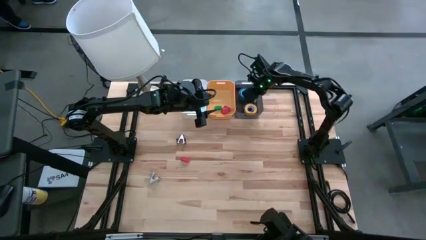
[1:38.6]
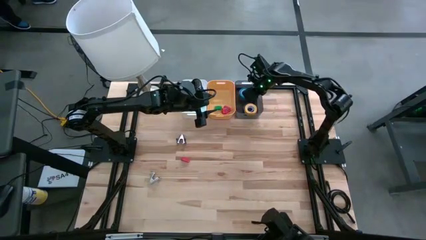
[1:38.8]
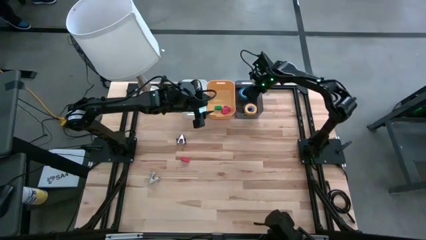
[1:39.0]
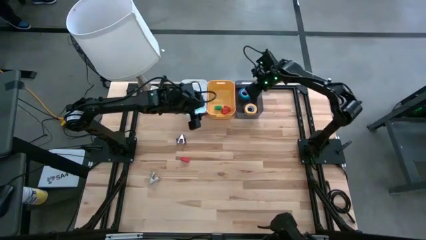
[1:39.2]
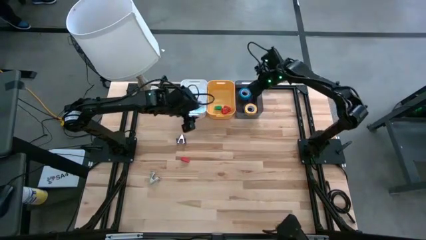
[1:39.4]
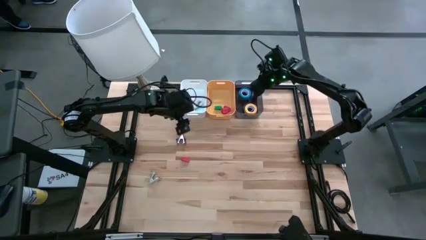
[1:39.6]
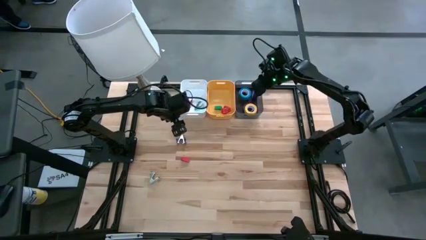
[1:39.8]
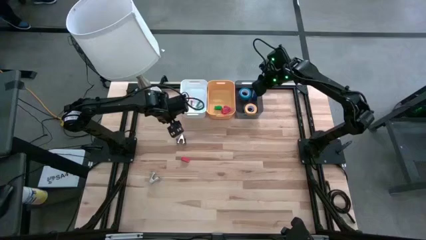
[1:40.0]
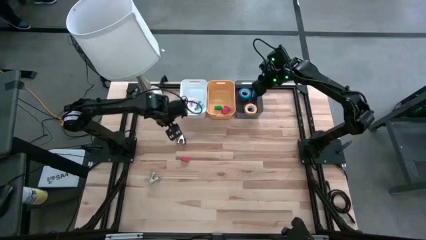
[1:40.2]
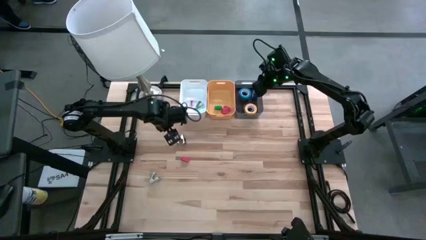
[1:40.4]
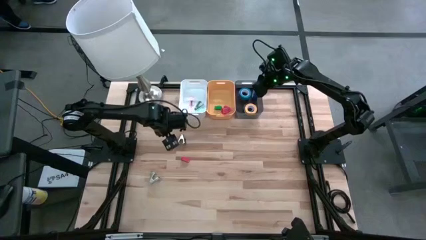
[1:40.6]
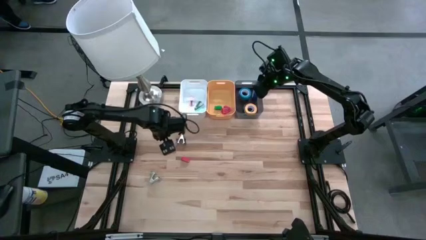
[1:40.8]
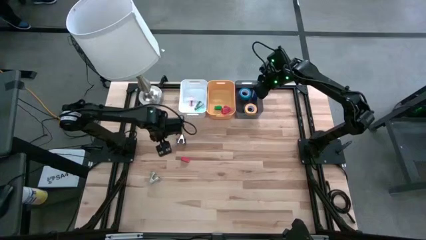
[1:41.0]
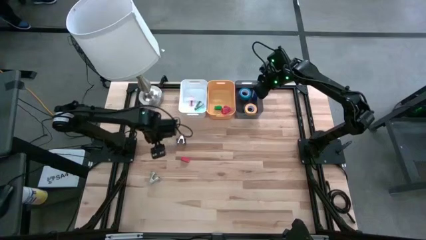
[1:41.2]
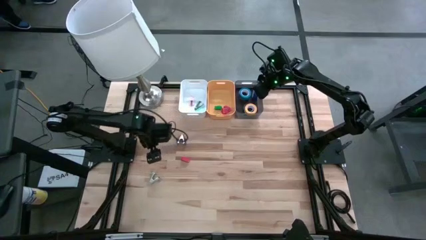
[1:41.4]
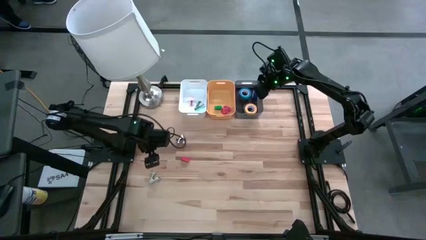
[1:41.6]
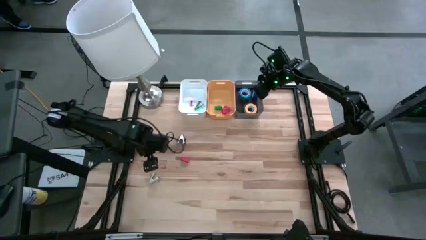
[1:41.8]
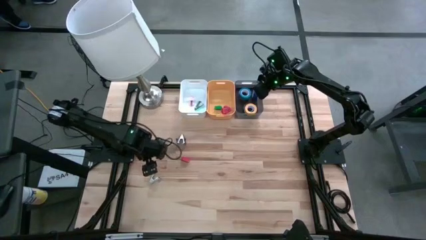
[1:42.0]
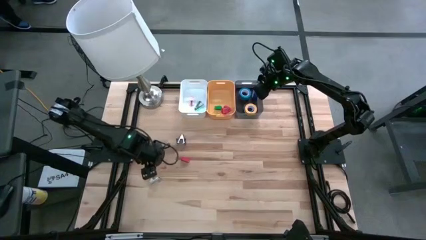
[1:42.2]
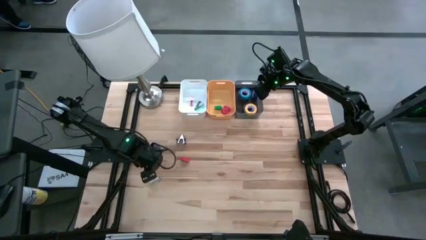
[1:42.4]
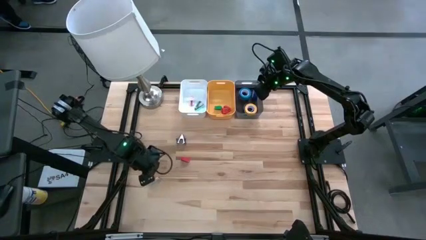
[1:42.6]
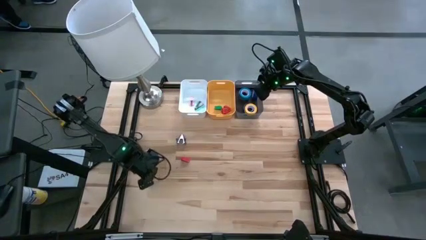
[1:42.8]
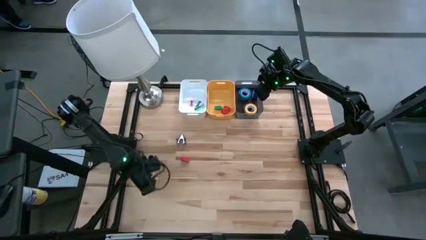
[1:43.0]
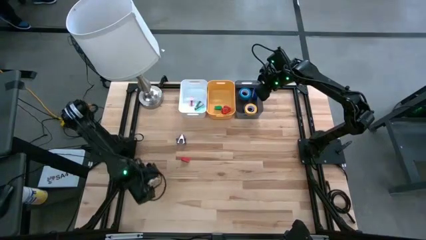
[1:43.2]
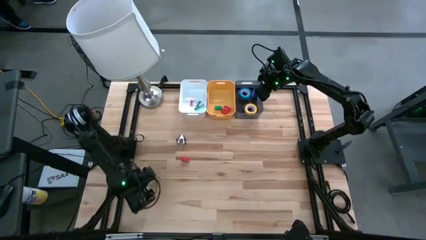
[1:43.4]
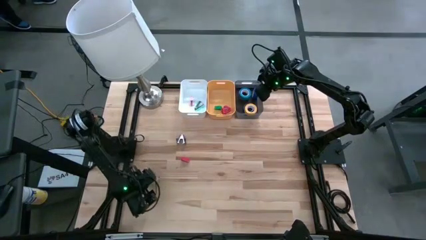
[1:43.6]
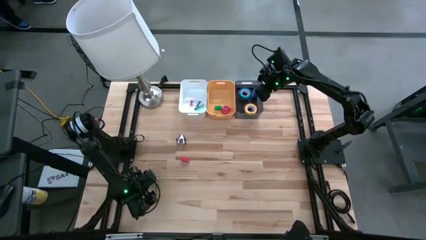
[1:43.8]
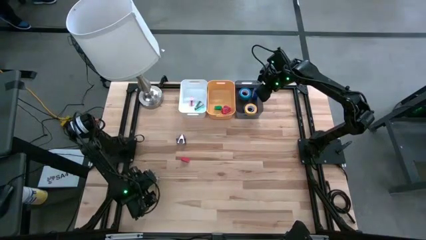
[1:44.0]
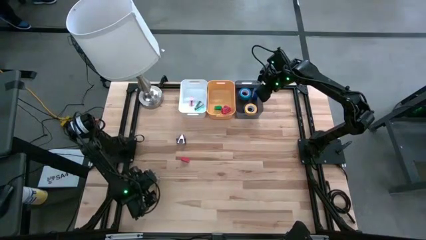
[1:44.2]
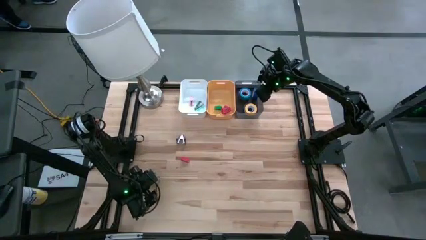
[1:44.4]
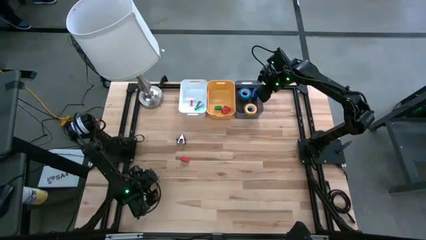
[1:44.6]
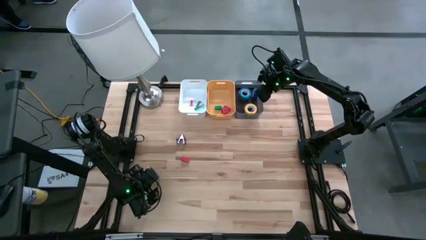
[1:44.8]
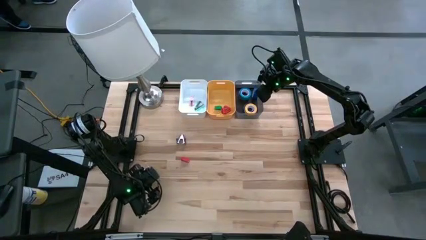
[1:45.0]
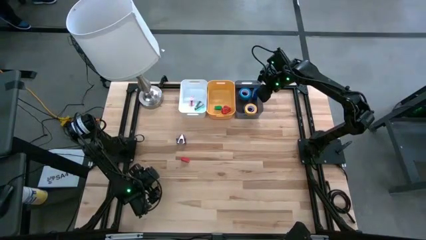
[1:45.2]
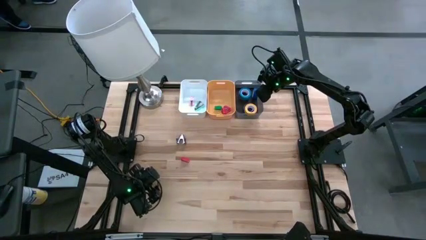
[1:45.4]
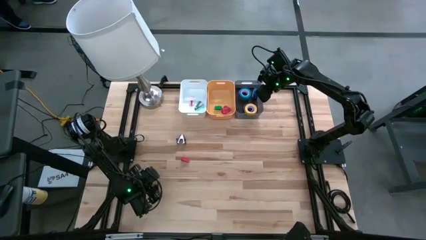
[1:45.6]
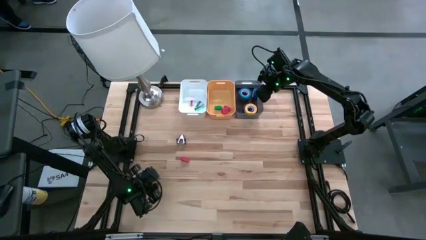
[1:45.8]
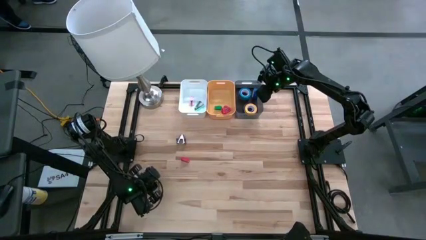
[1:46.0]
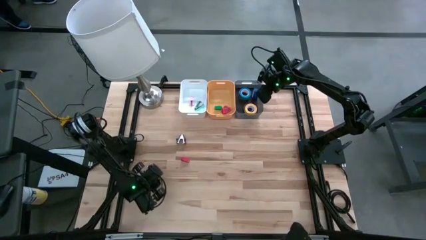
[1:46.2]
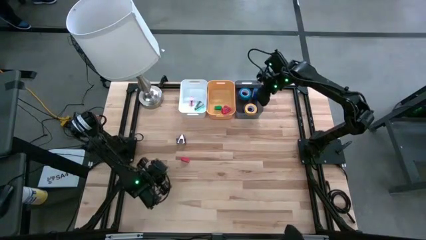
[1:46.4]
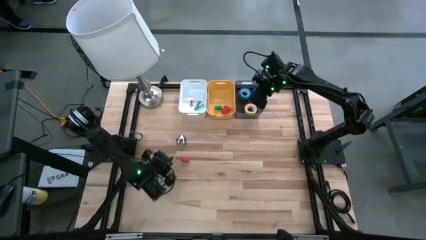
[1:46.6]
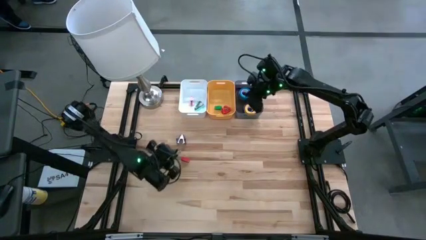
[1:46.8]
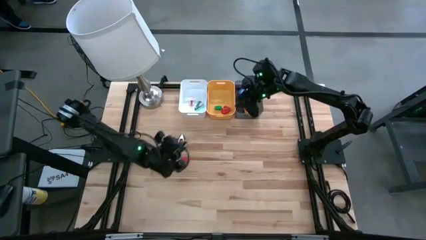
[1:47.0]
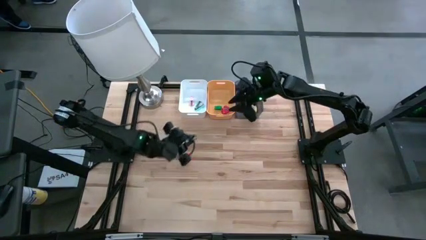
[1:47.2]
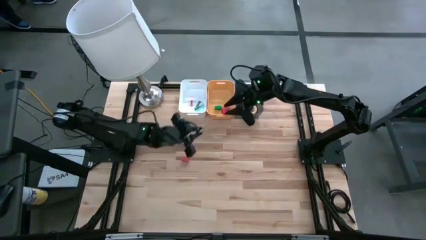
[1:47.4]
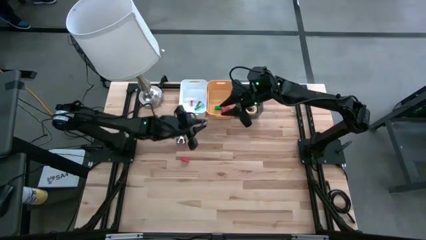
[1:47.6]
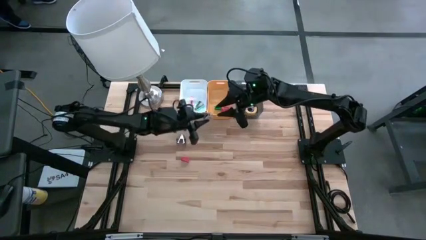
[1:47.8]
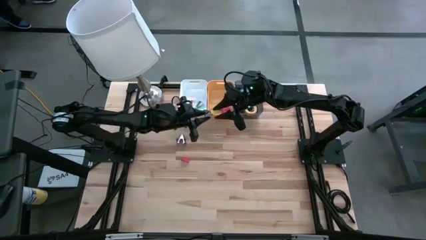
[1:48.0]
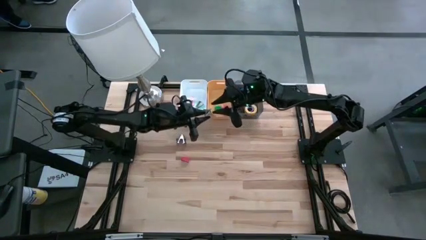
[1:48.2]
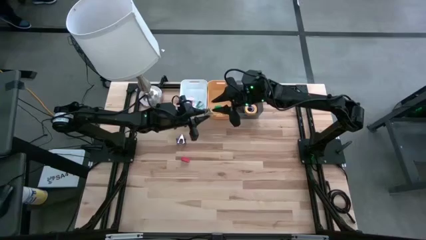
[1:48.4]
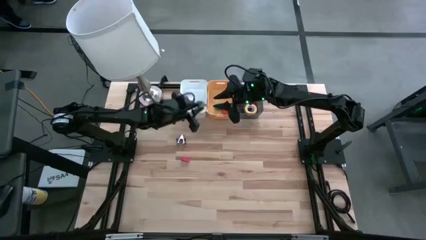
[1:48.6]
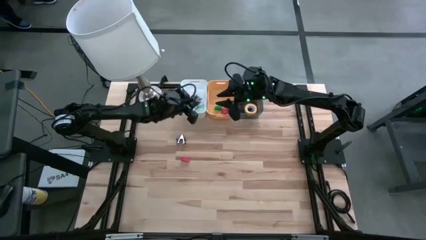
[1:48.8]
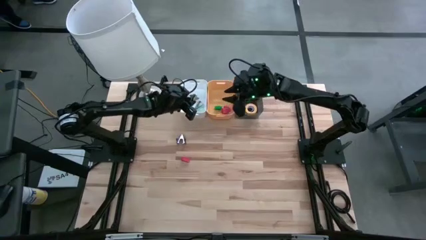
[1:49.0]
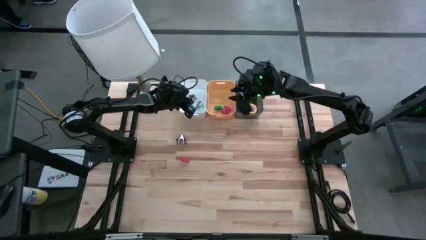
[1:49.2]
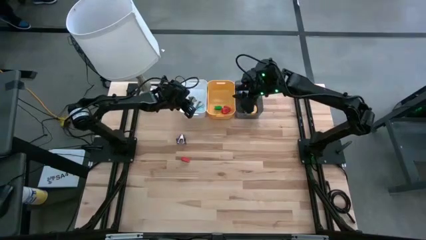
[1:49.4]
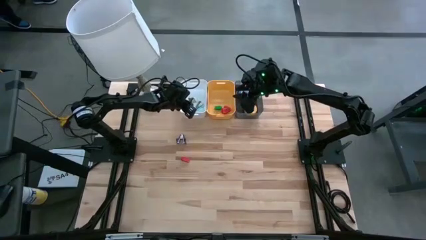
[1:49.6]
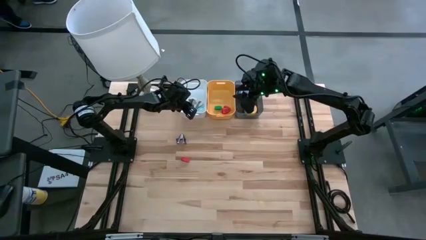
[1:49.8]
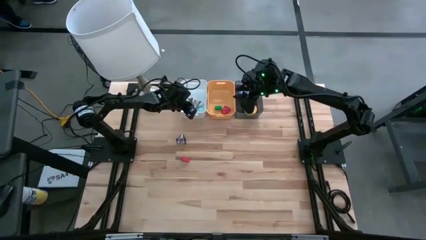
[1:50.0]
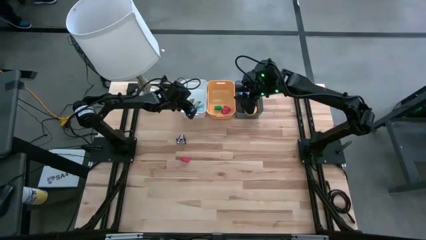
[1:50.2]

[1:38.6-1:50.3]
Task: Pick and place Stapler, Stapler remover, tape
Put the gray staple remover into the white bin
